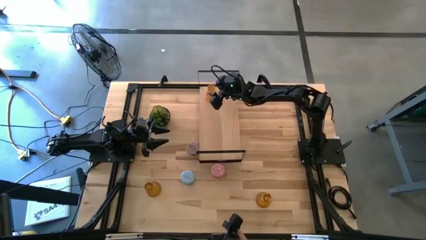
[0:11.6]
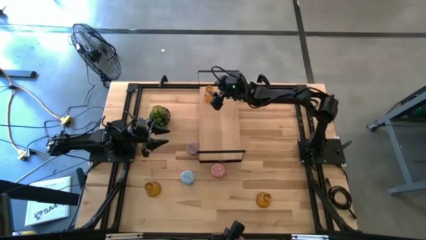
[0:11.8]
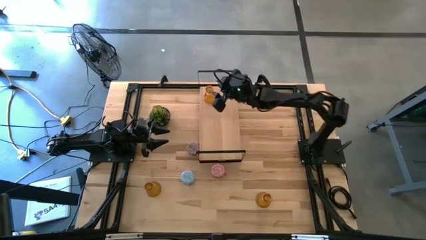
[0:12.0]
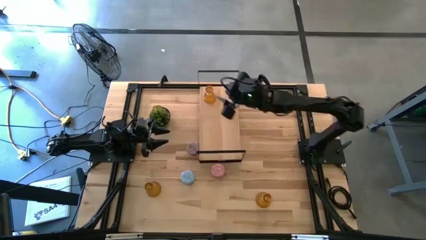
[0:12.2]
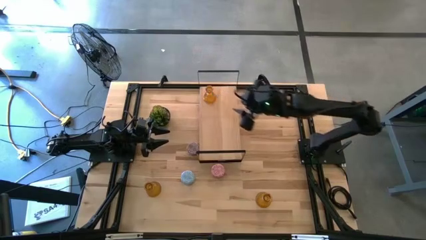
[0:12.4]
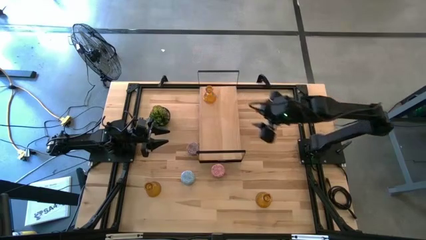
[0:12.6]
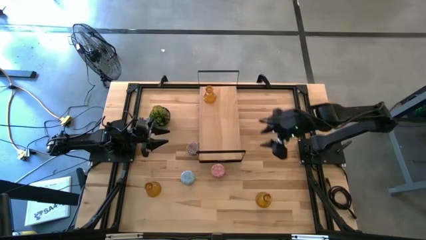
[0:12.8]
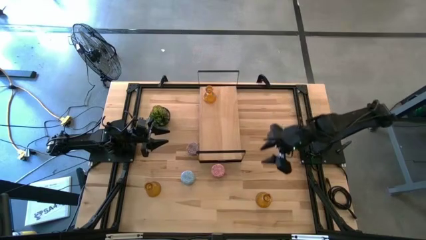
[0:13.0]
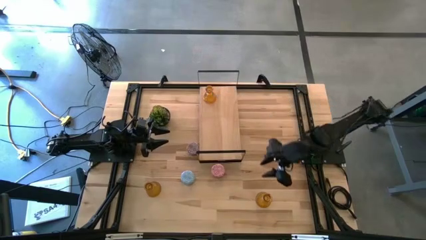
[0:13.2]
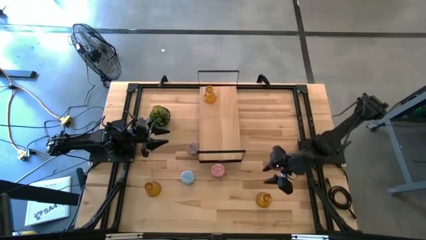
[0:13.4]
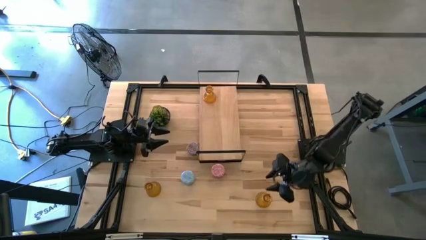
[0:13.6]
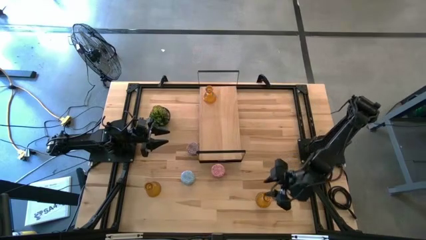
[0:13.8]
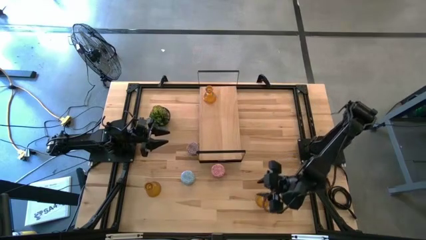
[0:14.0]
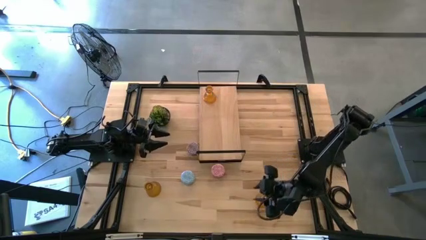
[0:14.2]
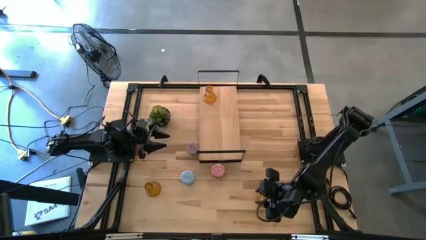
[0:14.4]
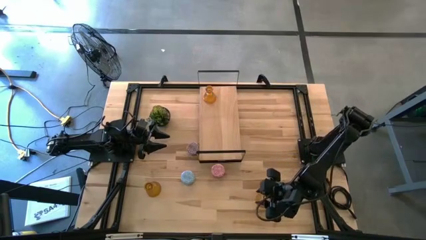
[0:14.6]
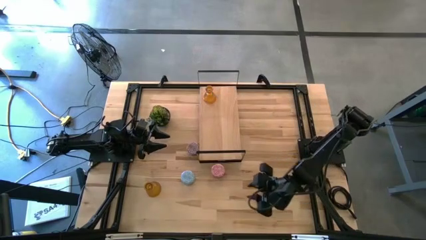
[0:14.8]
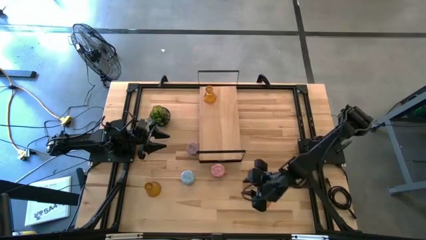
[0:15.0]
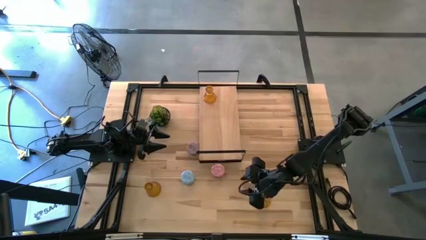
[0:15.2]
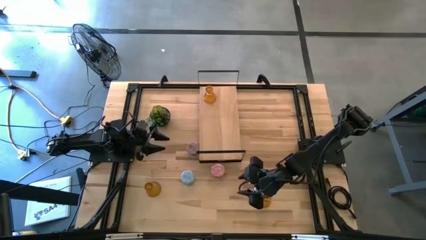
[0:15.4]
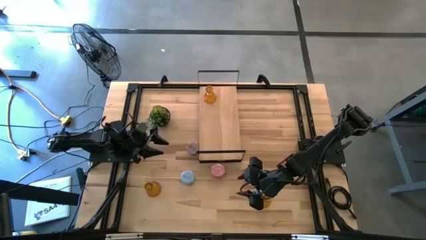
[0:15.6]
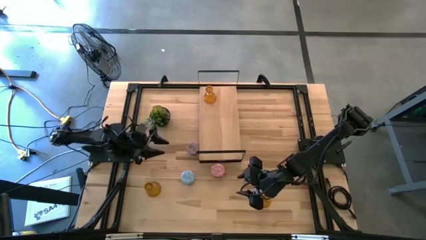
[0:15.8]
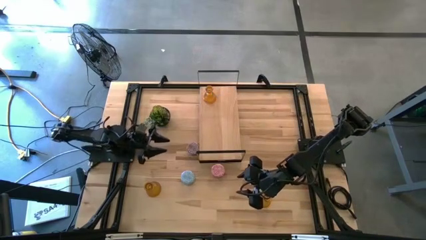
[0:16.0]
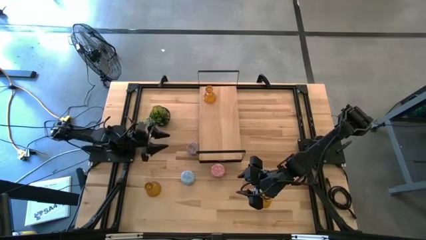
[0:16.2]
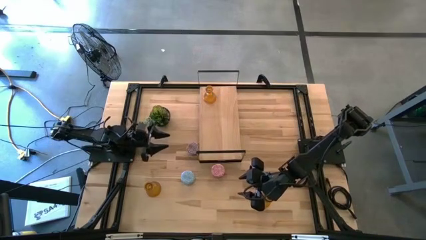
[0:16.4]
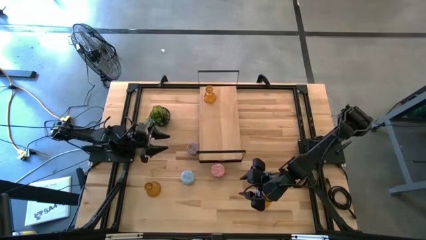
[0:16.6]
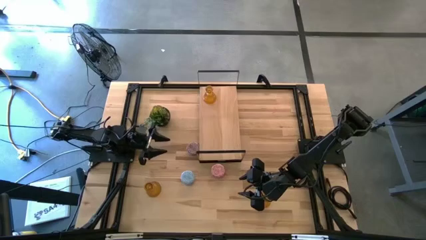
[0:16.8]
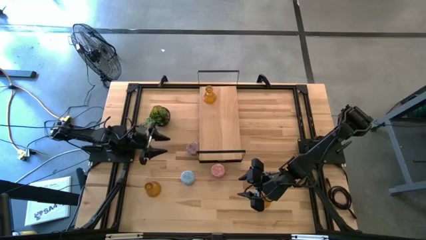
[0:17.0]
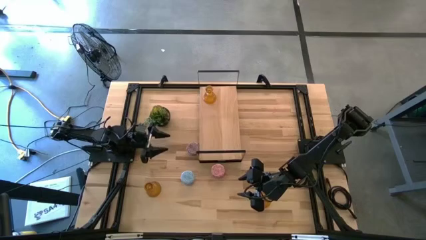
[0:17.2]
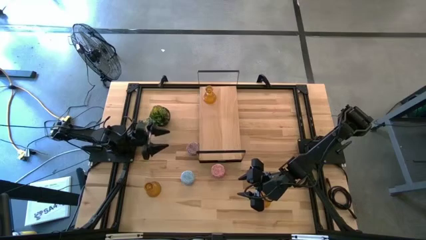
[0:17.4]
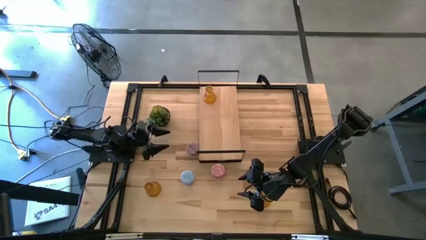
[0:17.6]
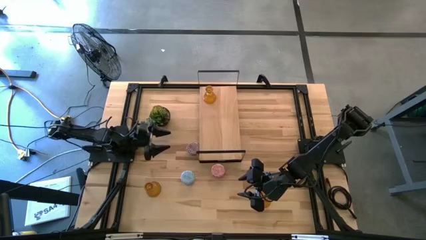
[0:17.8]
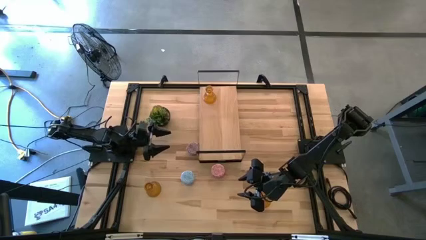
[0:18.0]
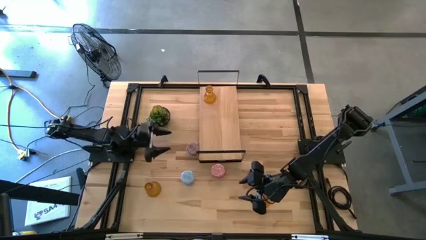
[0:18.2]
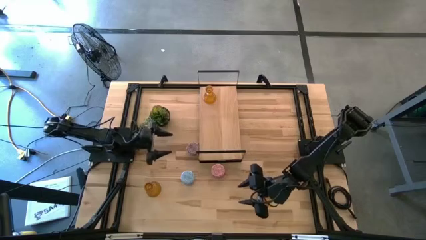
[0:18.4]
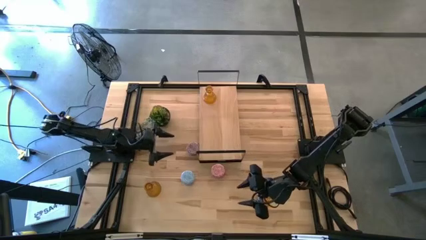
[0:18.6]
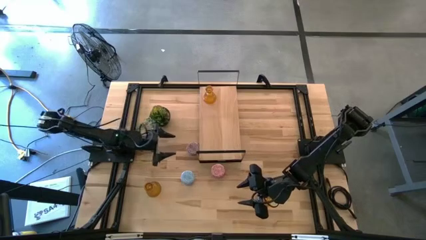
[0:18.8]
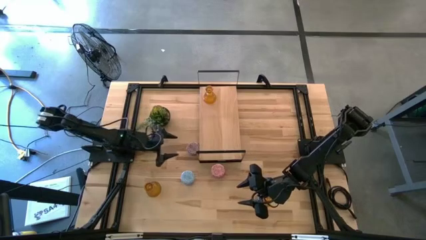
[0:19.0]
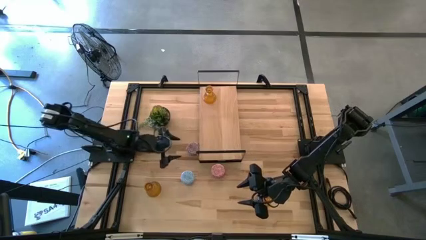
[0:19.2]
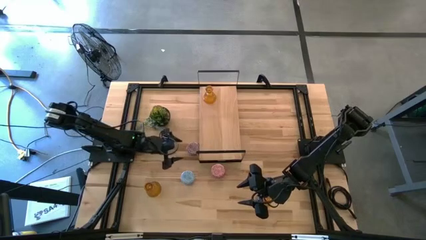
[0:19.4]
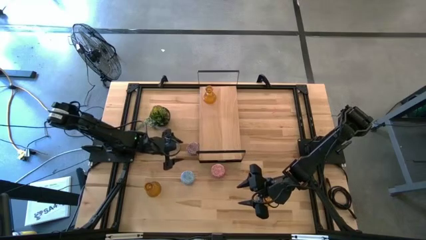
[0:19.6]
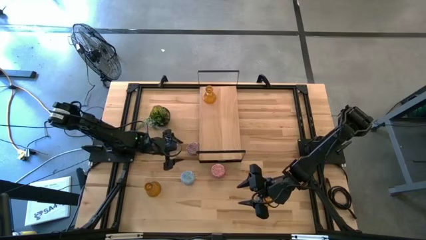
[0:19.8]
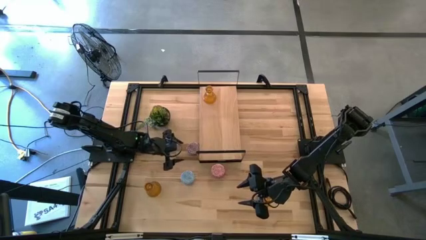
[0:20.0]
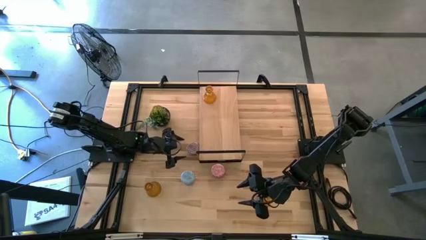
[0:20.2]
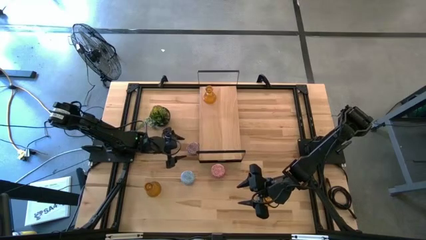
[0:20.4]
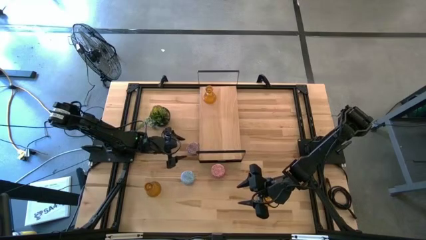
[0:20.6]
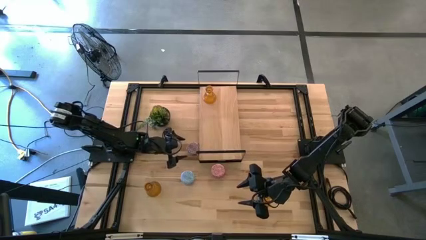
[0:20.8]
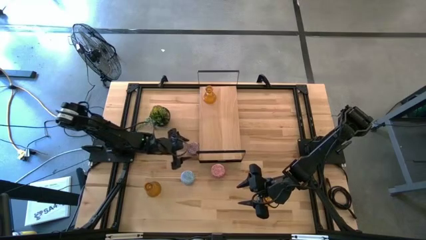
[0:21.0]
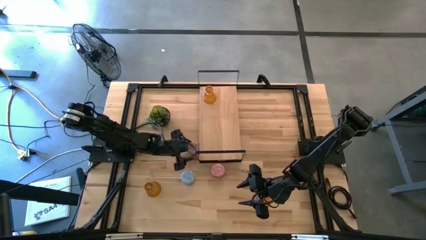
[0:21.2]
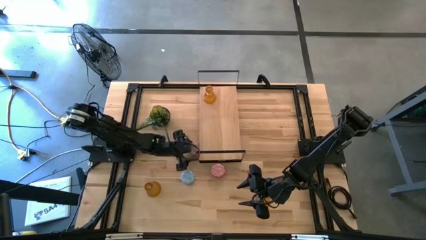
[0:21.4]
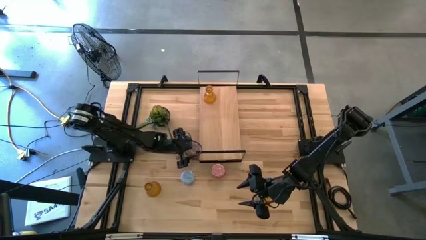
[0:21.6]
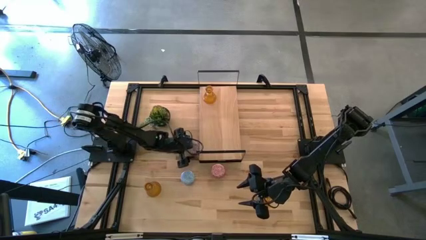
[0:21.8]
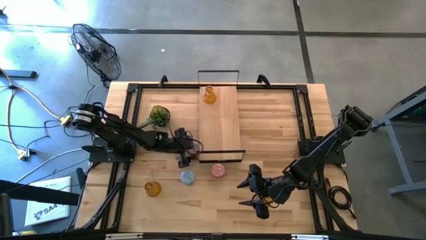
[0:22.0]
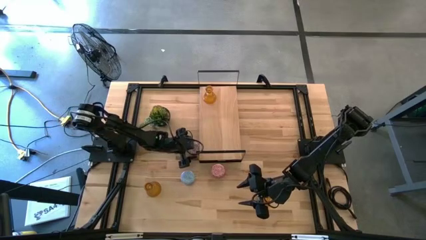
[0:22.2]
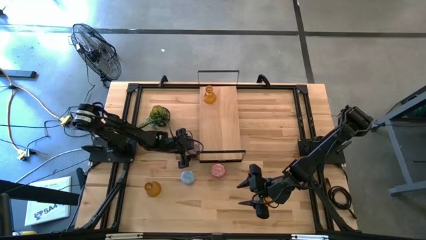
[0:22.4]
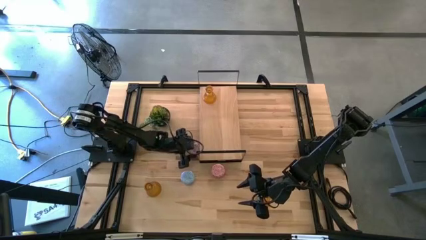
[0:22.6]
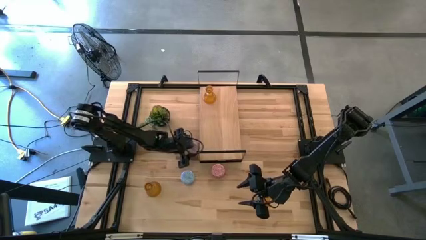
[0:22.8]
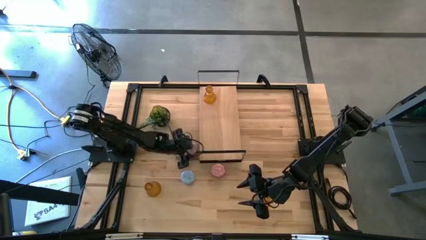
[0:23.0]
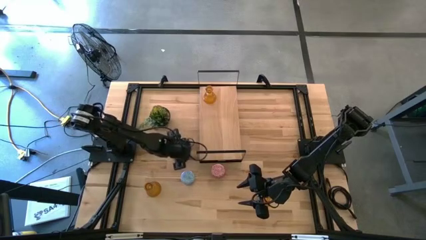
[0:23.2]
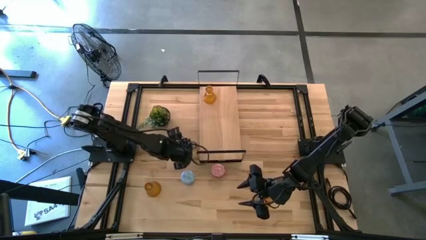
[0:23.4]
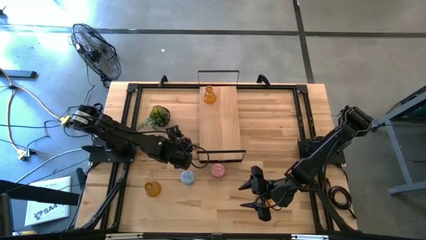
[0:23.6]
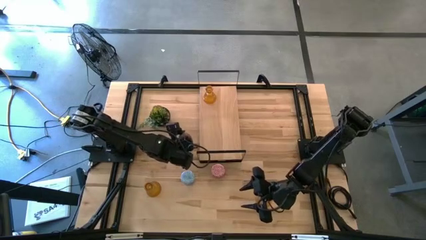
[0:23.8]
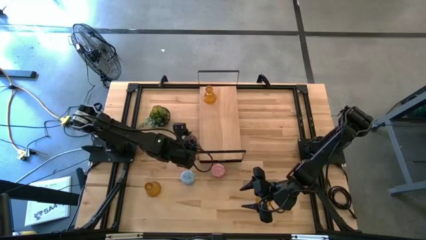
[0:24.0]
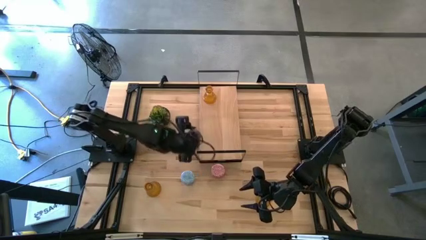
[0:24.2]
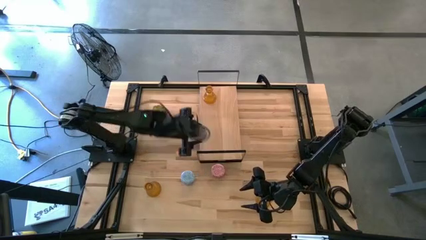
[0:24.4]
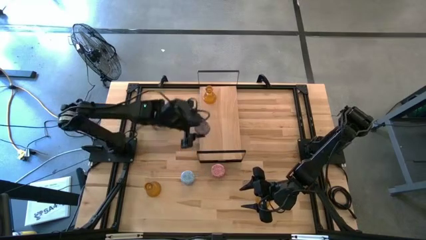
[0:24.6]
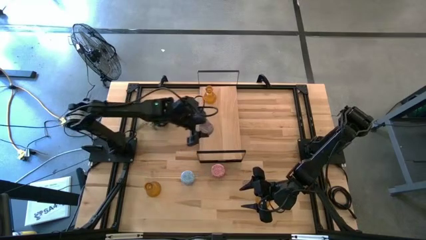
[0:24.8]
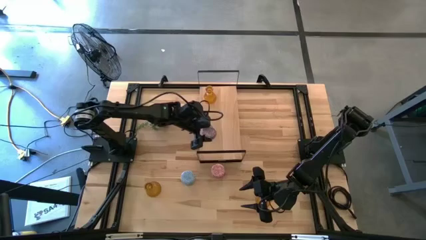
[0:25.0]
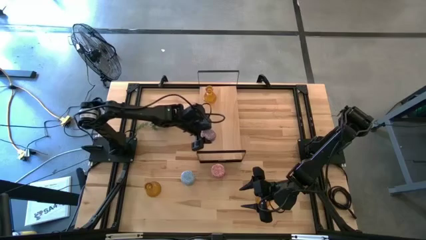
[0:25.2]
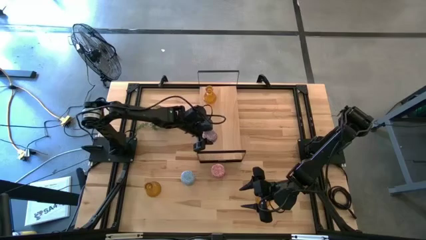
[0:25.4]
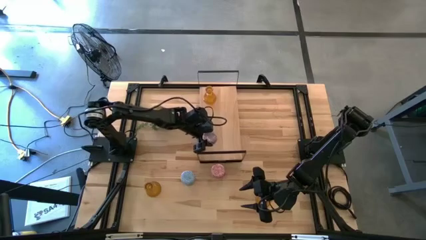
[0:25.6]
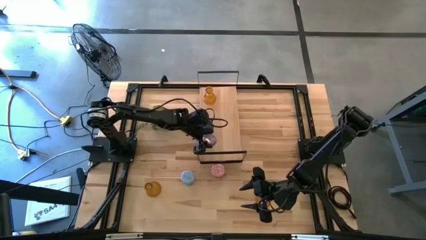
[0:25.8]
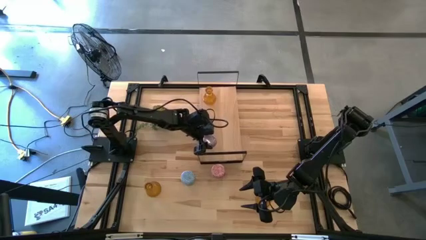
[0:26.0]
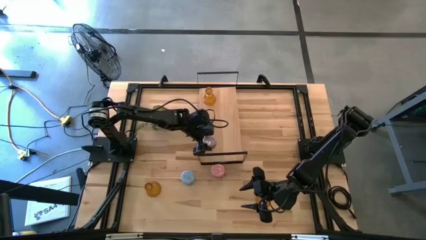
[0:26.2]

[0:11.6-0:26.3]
Task: Pick & Place candle stick holders
Put the red scented candle on the shelf
